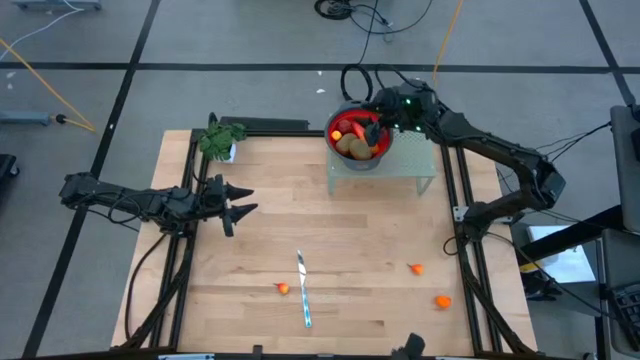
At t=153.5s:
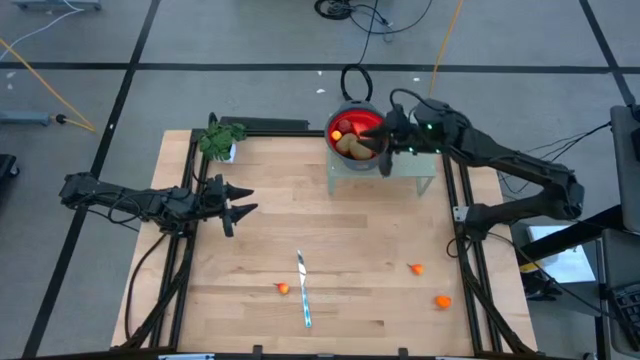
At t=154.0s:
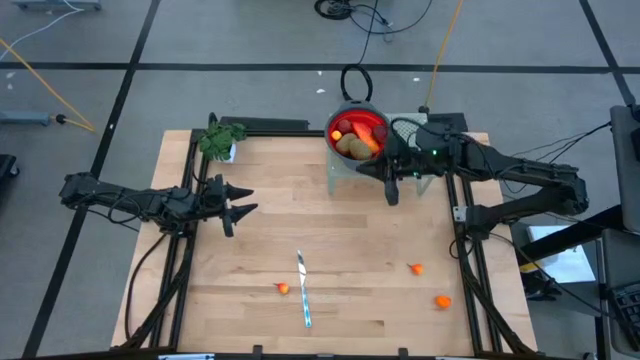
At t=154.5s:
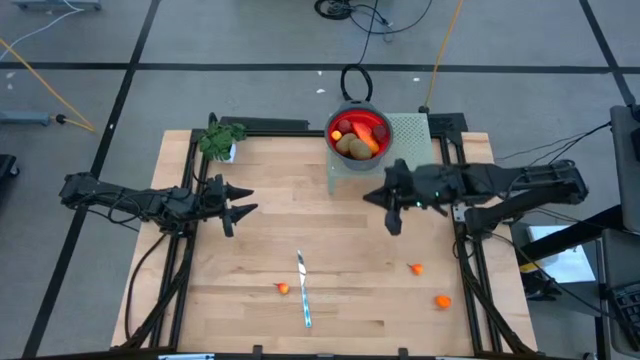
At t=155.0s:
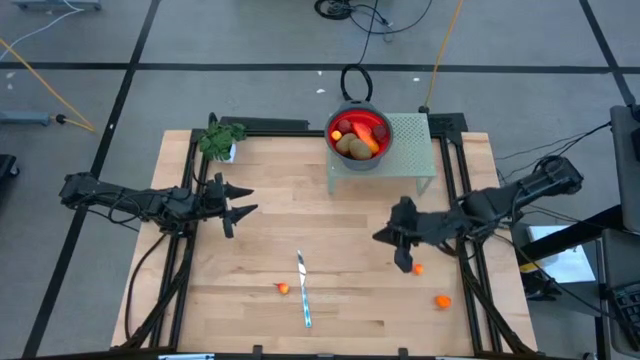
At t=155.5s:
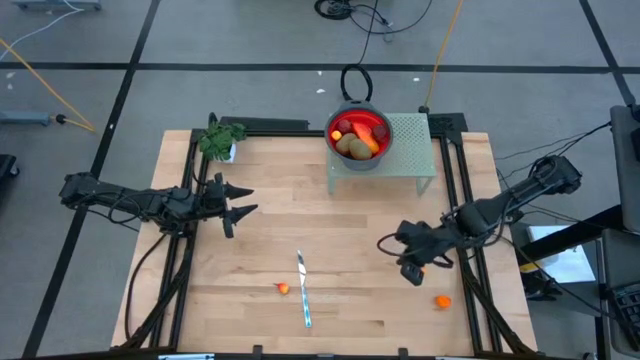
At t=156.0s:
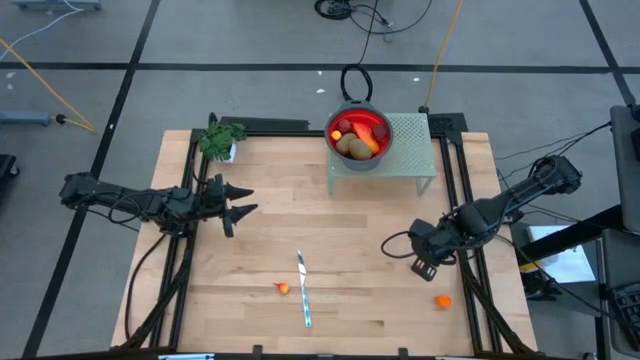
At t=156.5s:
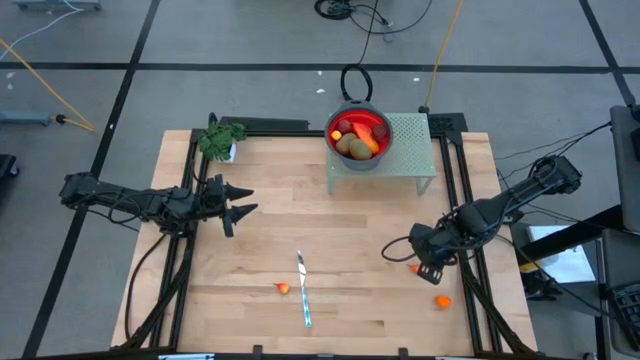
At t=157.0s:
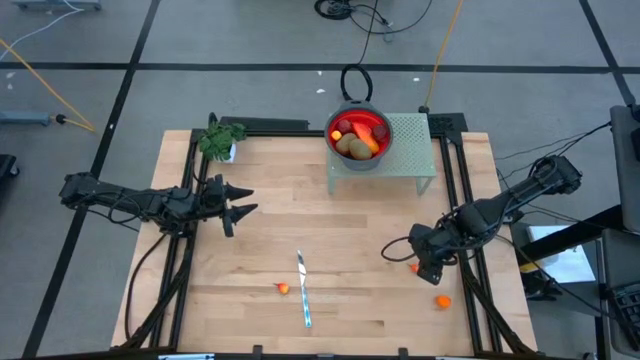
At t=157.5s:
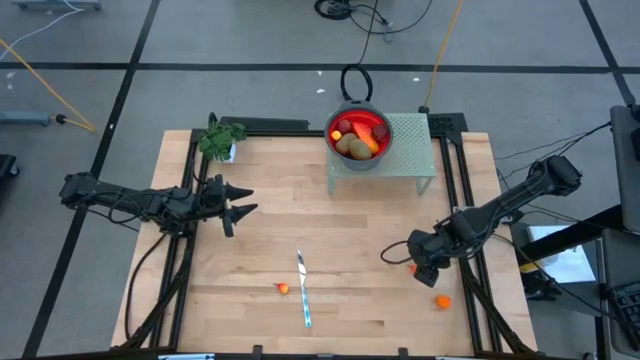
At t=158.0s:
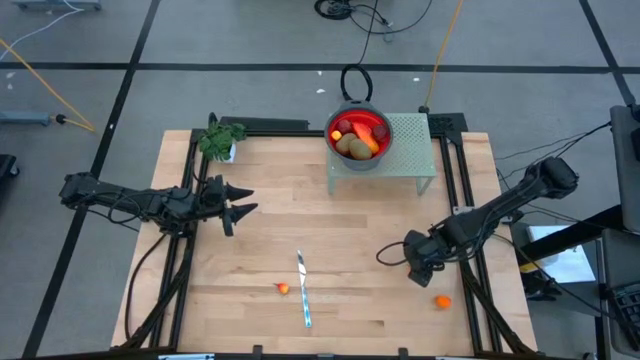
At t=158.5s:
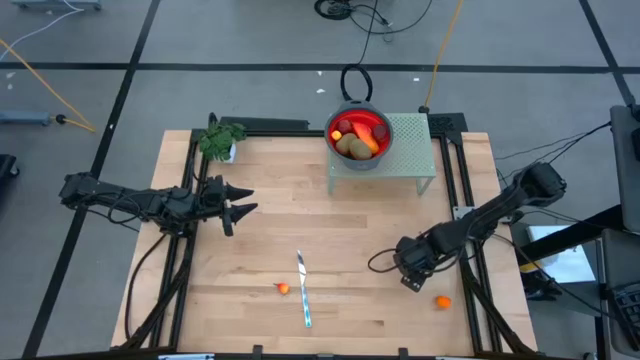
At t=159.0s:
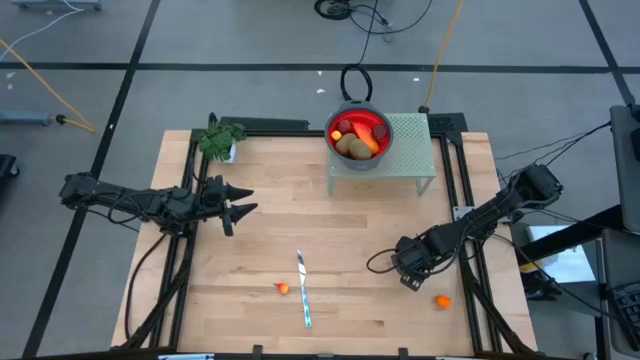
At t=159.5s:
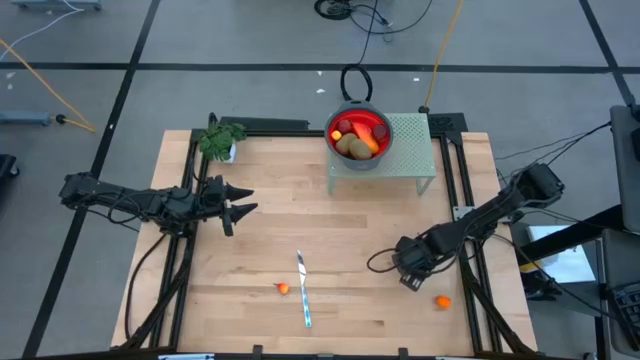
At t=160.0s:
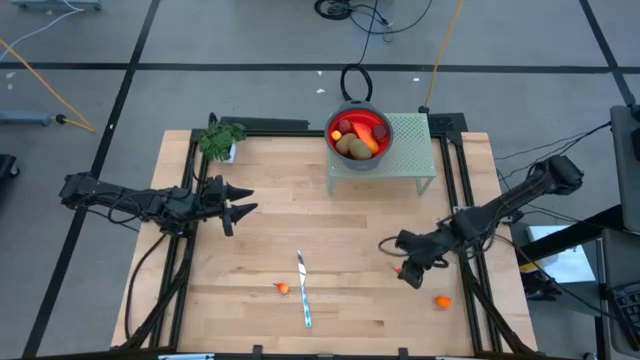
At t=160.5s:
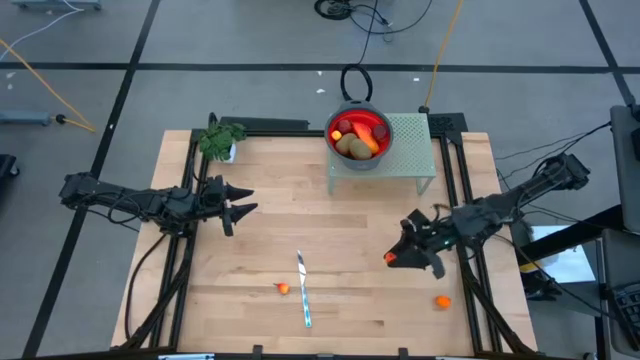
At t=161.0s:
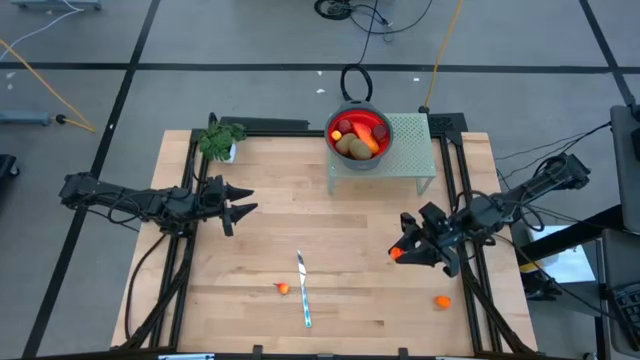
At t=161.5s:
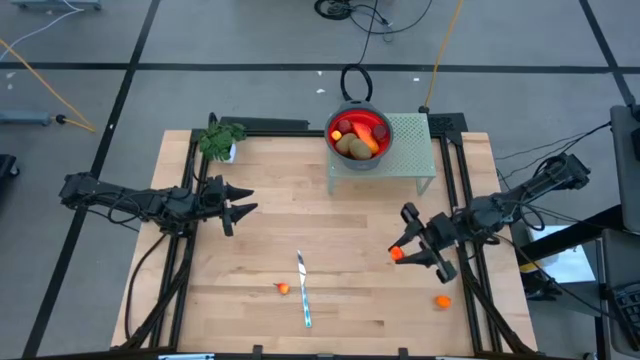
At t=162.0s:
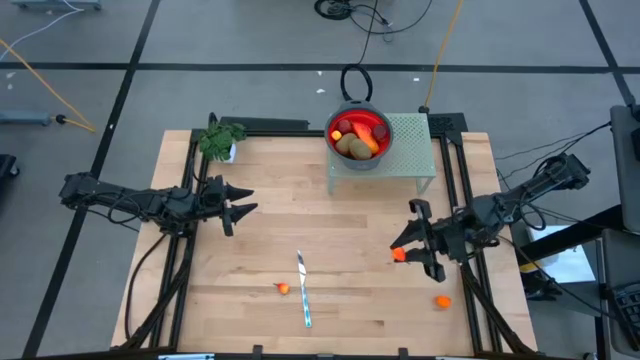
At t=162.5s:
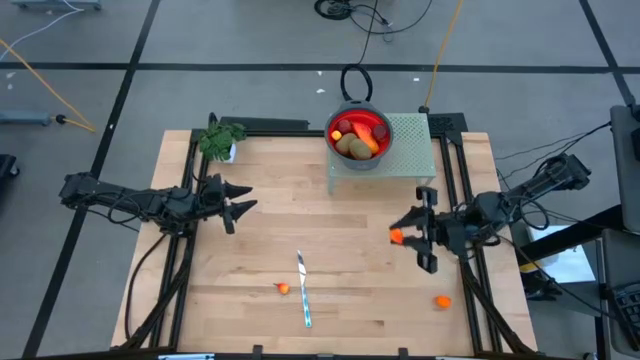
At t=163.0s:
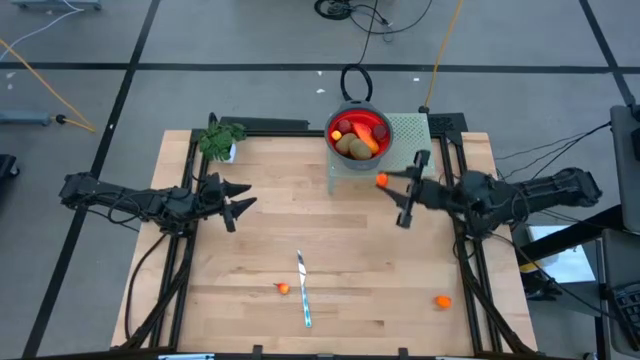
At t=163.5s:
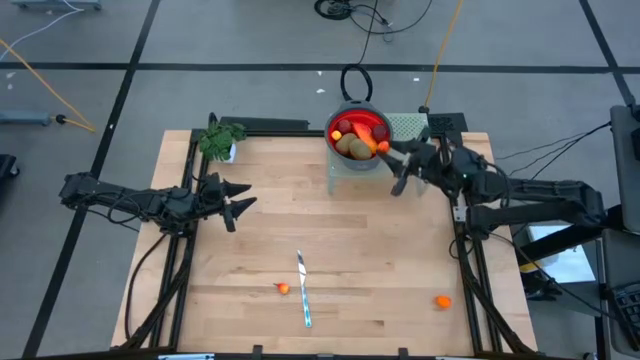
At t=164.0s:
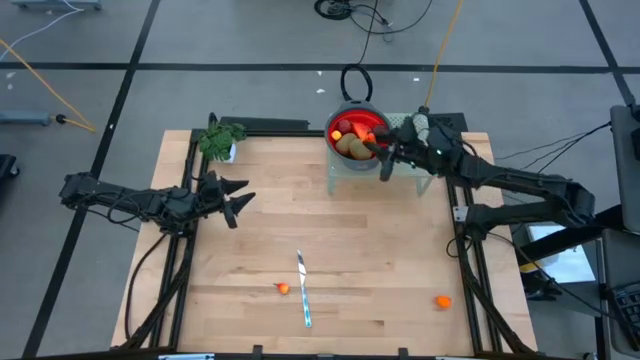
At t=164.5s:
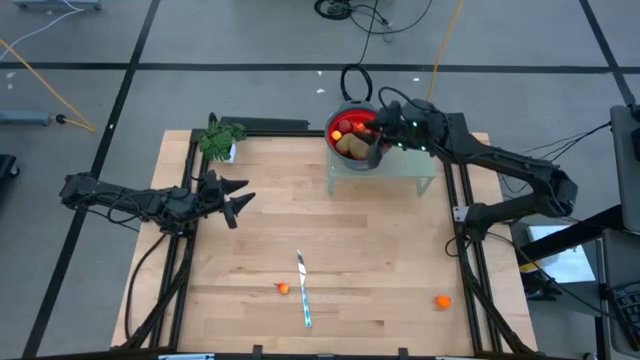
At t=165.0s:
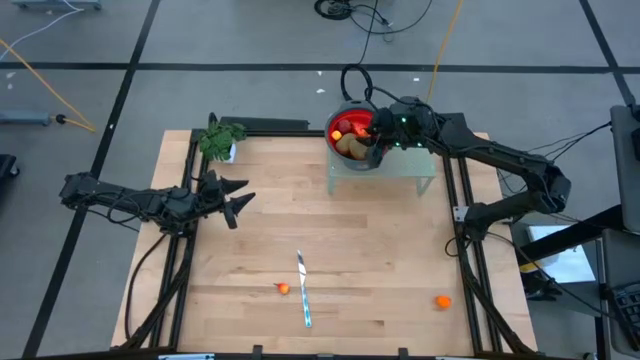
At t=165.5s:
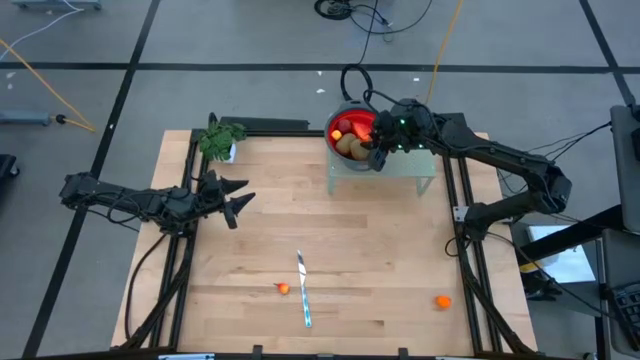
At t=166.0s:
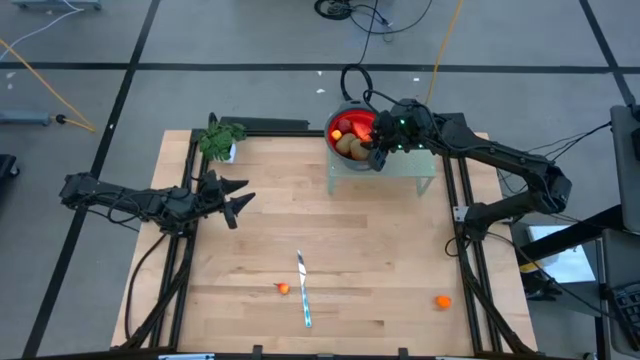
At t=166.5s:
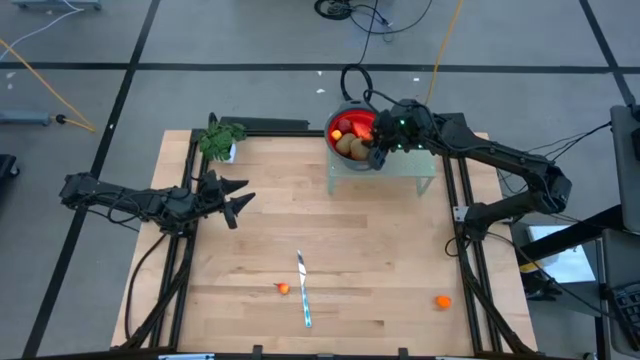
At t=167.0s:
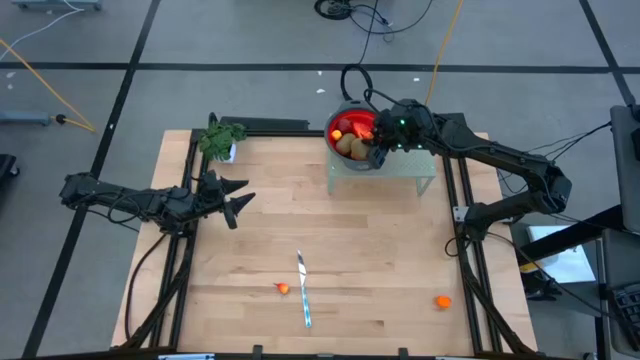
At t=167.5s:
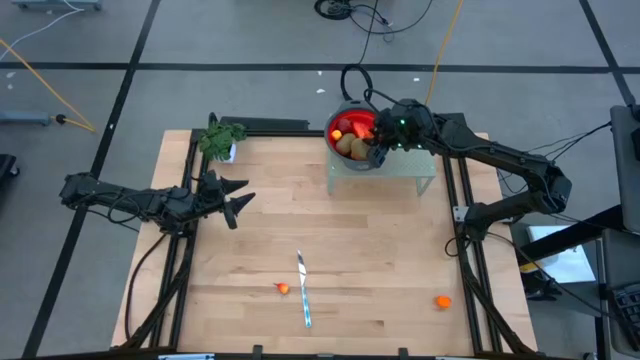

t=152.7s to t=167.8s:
Task: Pick & Place Fruit
Put the peach into the red strainer bowl on the shelf

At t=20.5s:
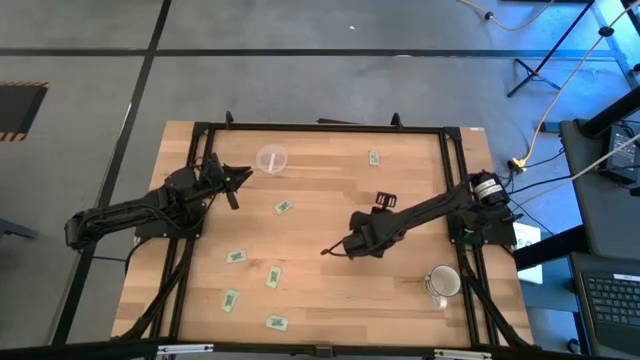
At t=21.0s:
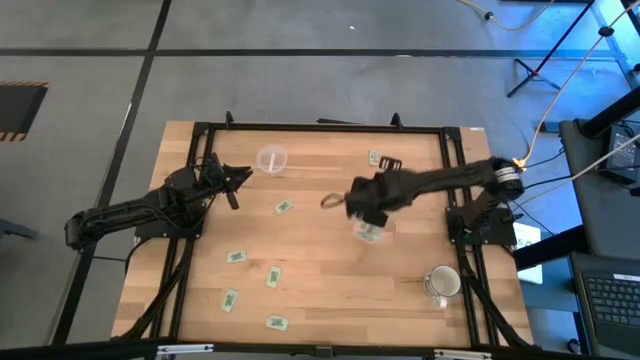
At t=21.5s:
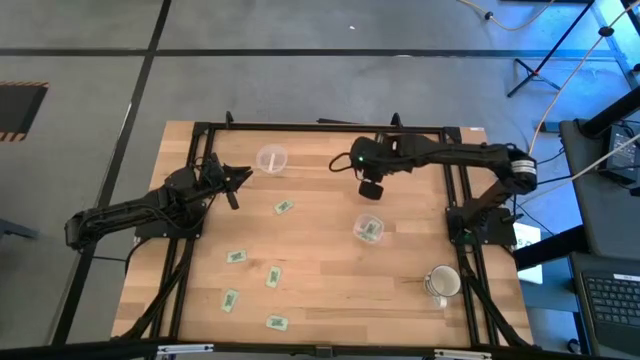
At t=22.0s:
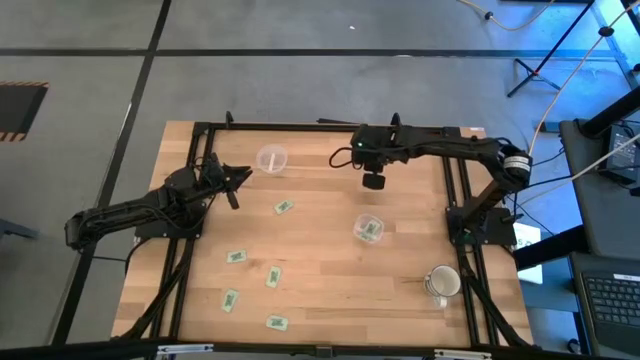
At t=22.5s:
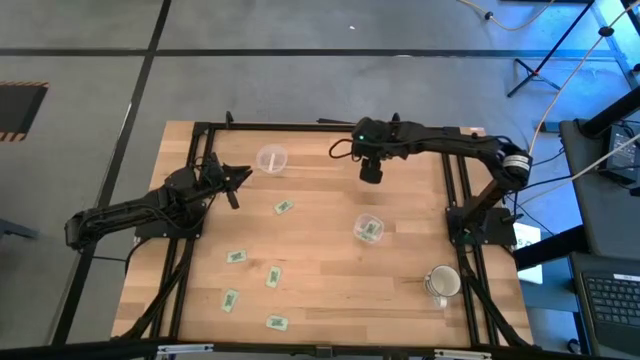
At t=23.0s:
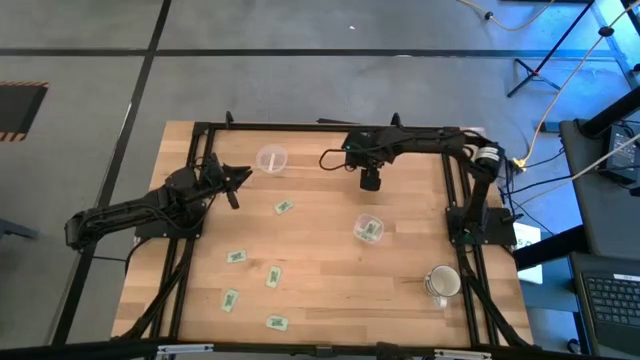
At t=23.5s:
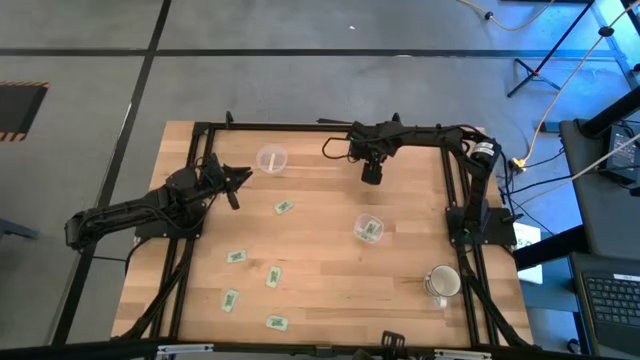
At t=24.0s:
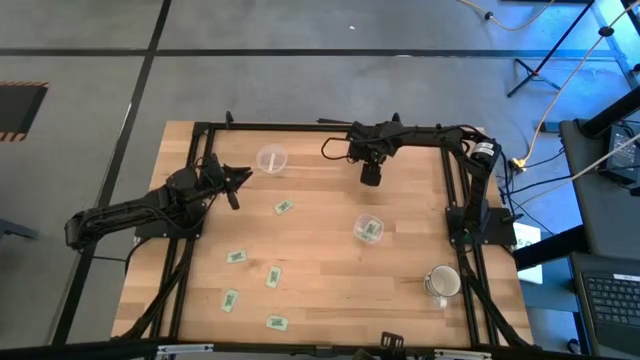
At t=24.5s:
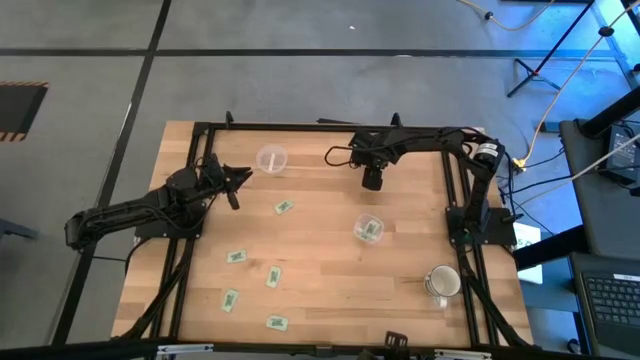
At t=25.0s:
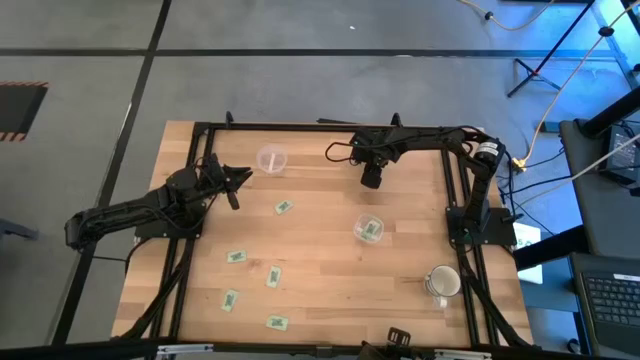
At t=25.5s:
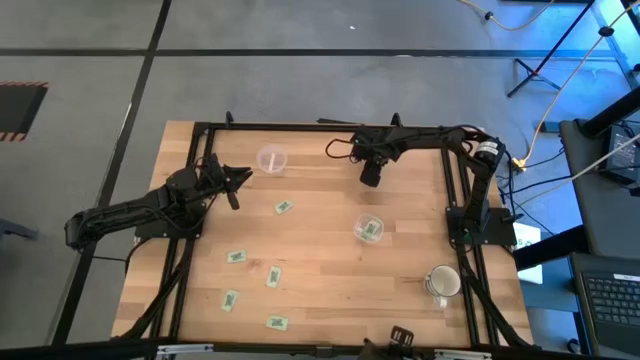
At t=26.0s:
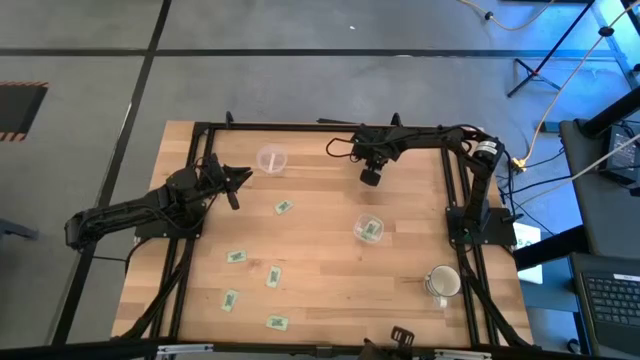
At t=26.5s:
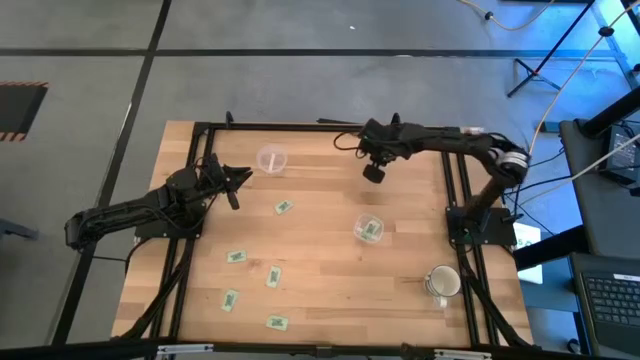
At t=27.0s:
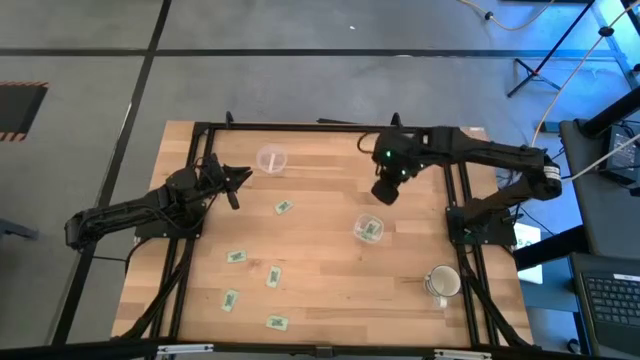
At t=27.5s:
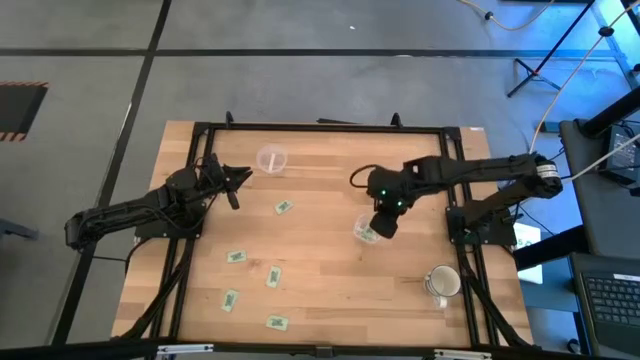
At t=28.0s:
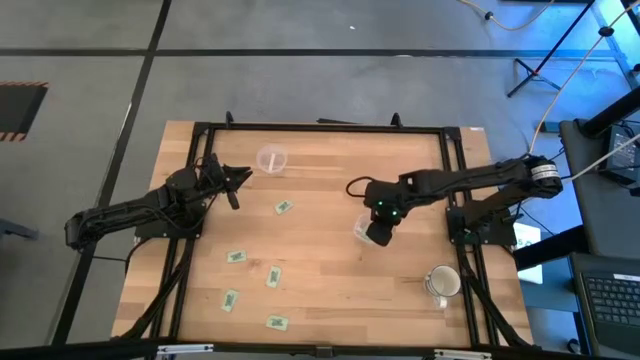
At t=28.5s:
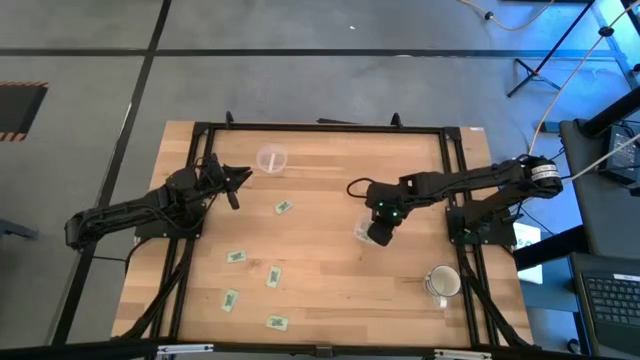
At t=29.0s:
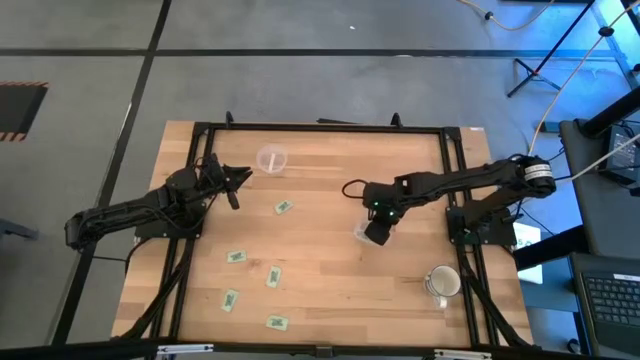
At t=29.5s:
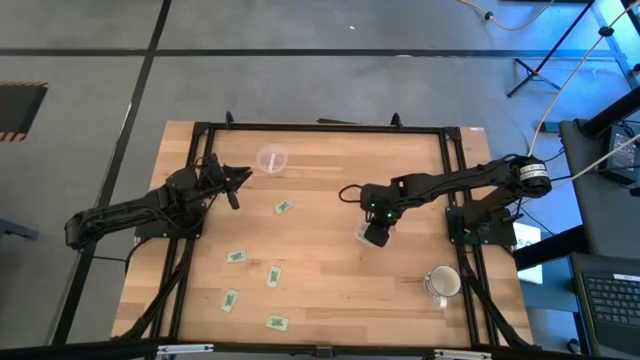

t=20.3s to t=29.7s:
Task: Pick and place Stevia / Truvia into bins
Put the stevia packet into the bottom transparent container
